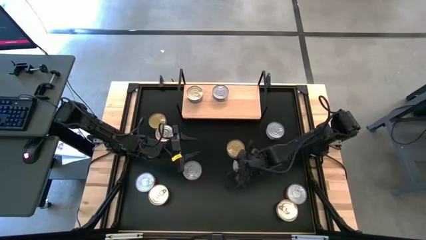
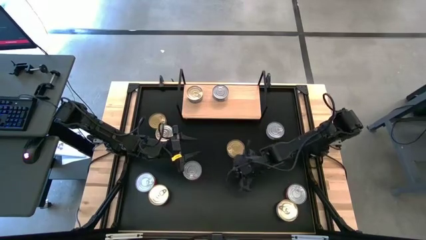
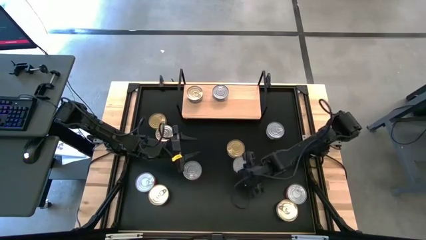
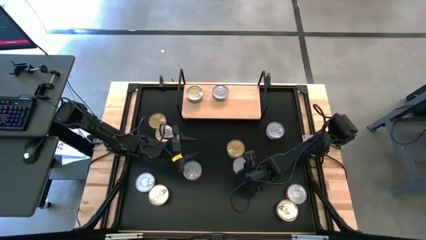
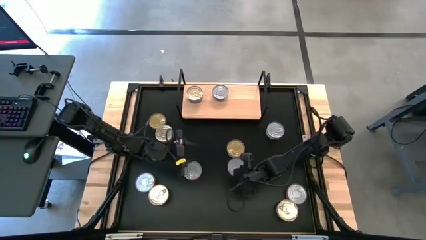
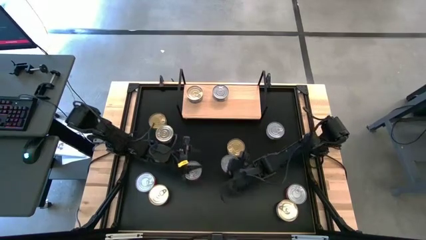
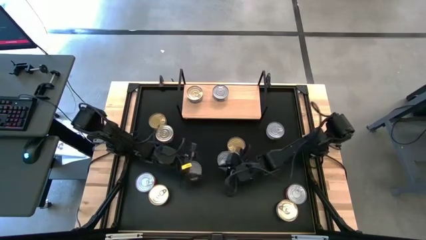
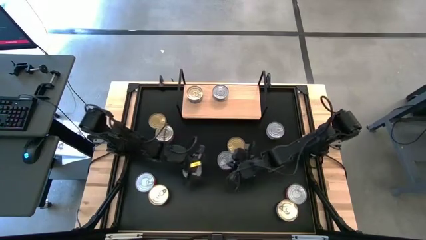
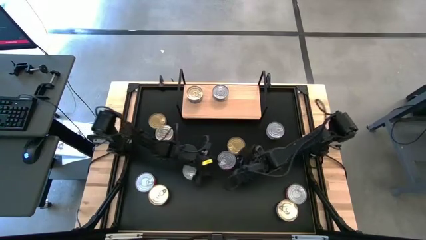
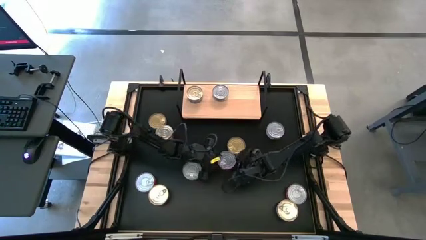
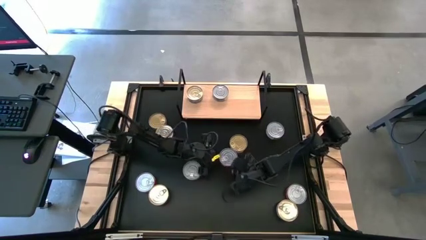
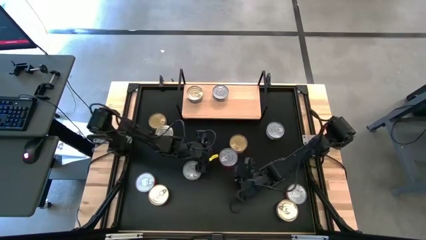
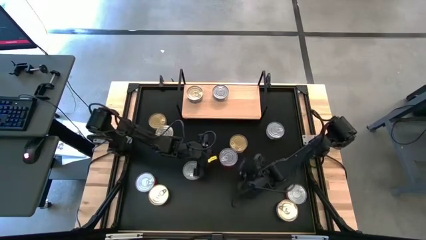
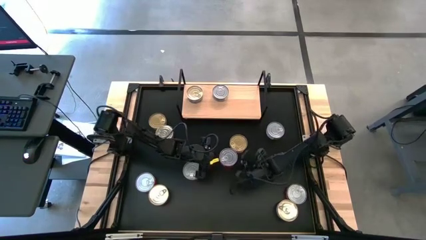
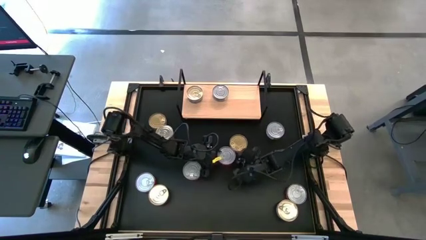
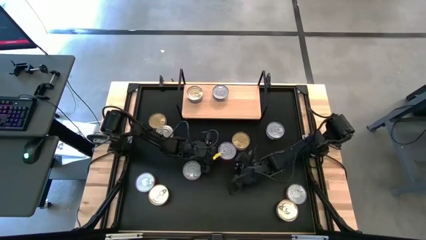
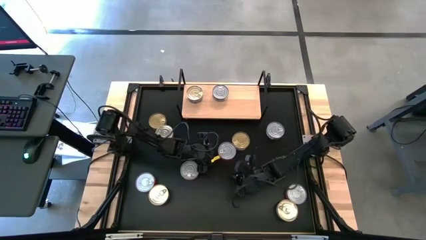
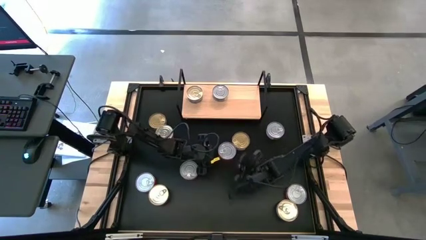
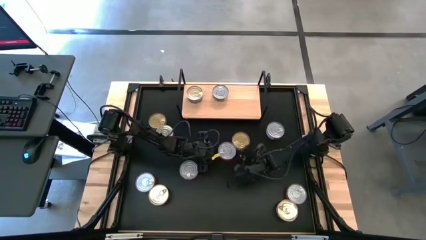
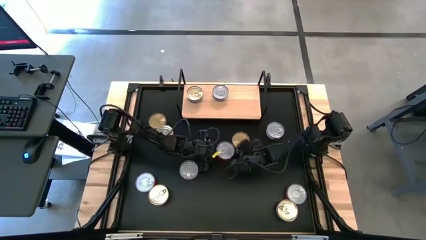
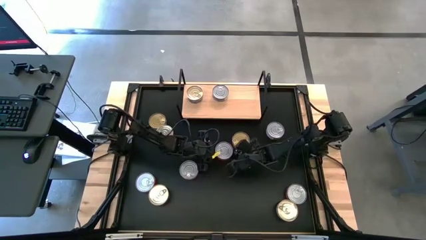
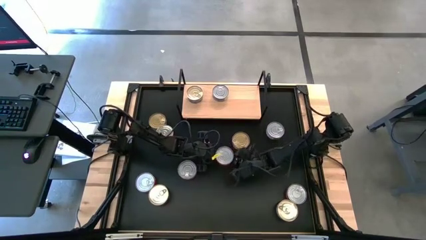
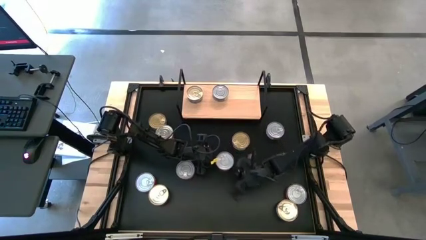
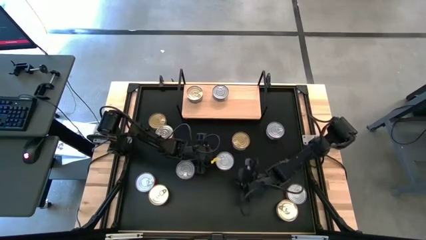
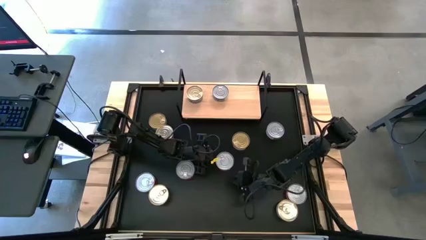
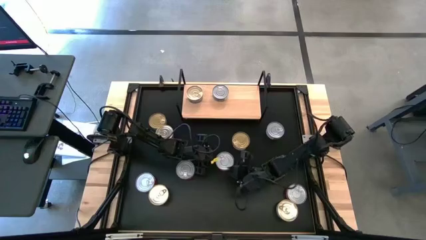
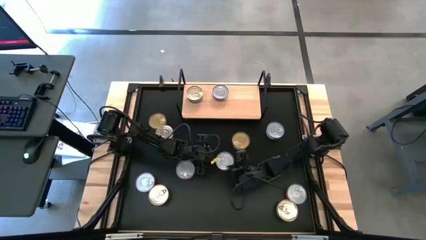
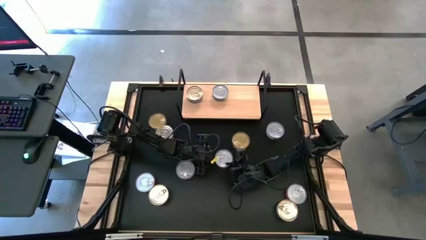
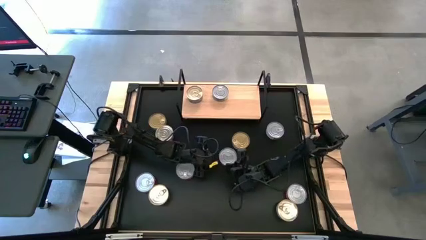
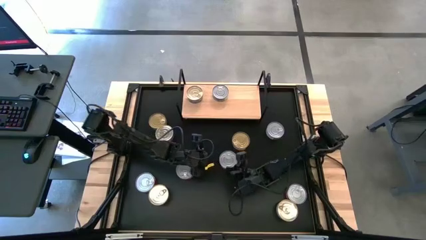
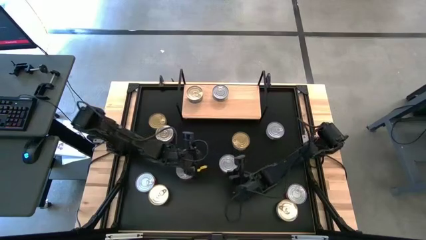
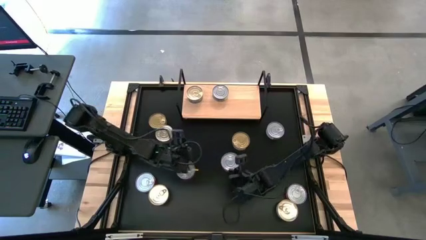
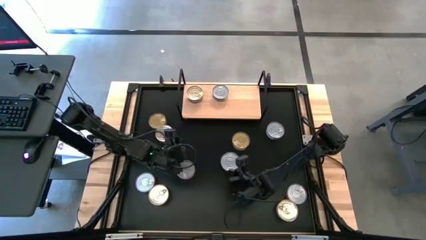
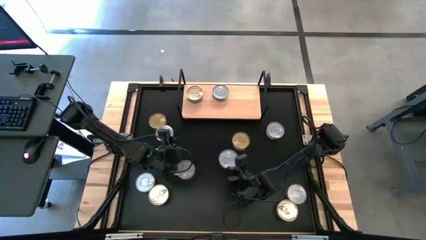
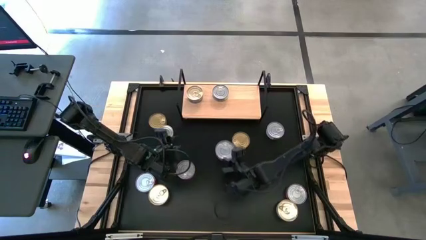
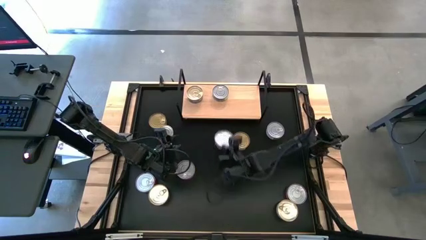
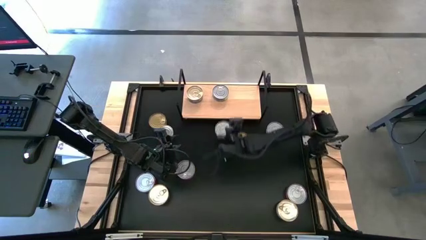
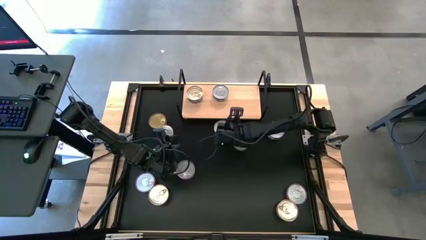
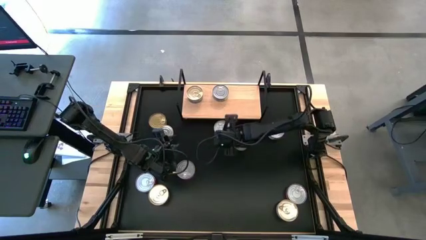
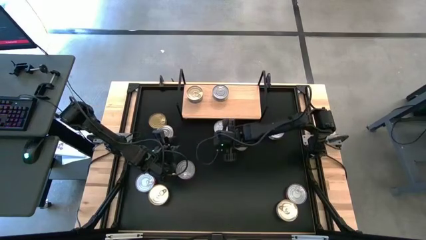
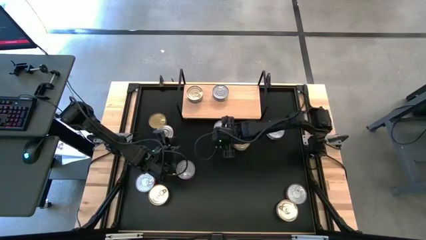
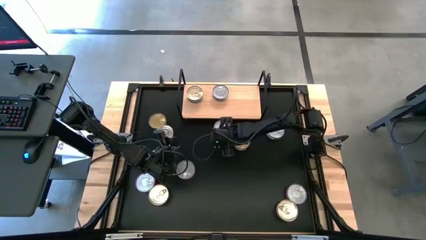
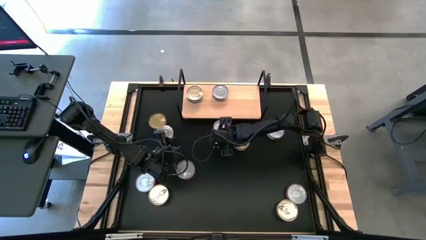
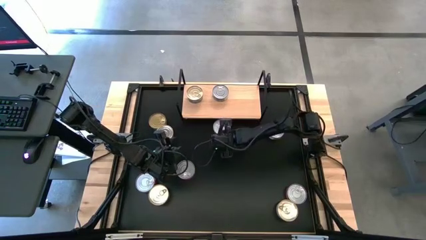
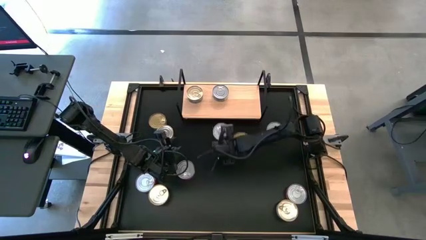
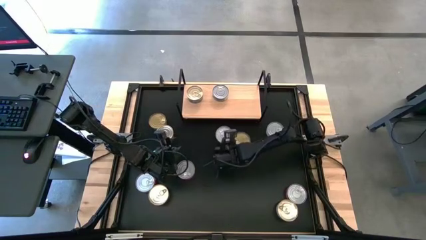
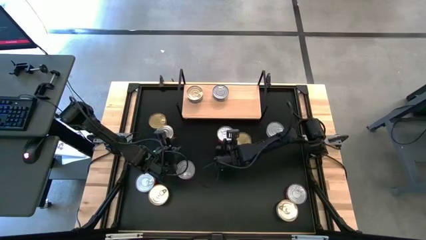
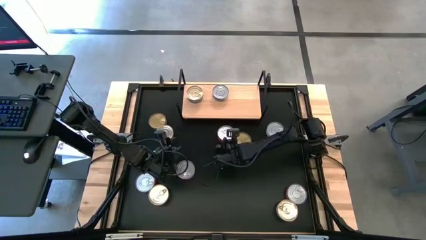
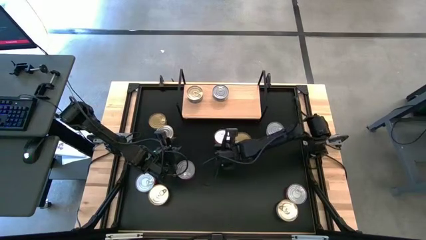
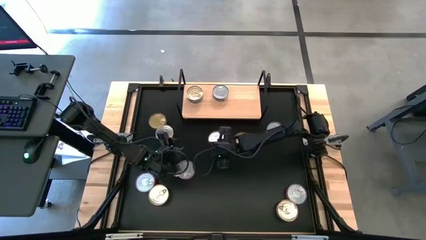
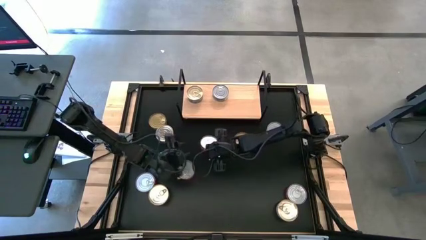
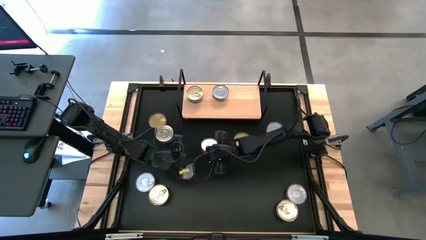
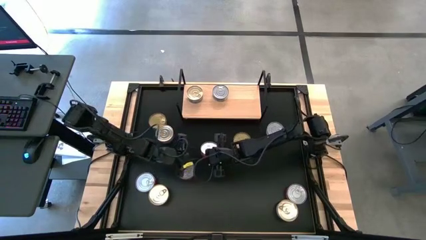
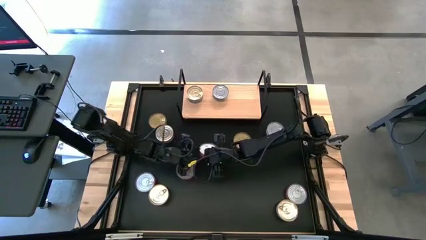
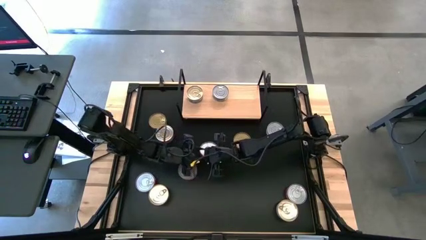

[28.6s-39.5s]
Task: Stack canned seafood by type on shelf
Put the top right red canned tuna on the shelf

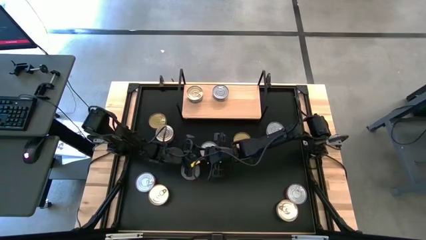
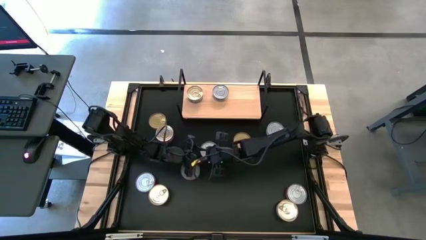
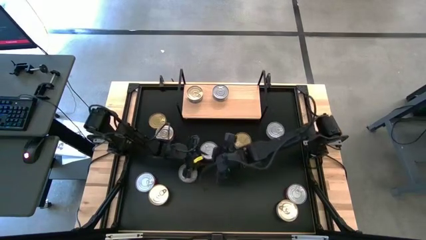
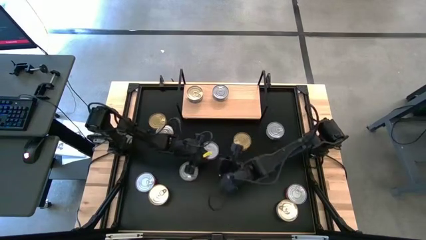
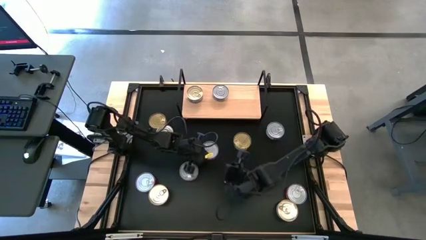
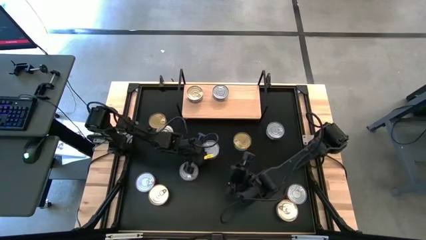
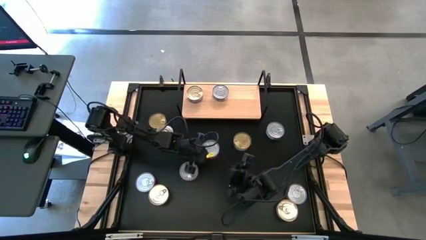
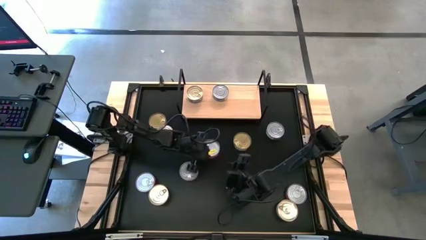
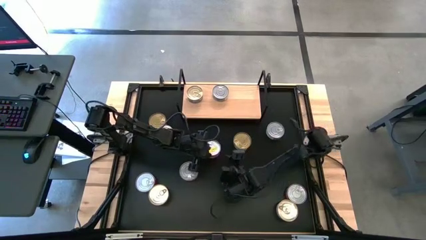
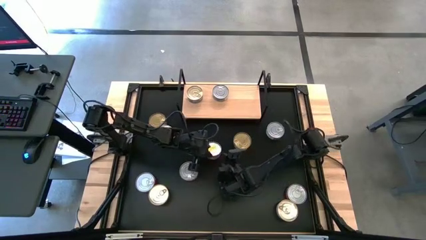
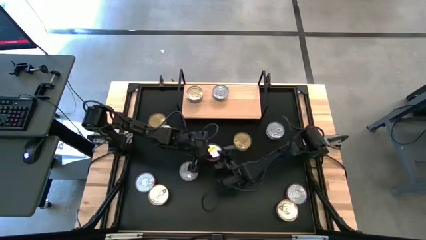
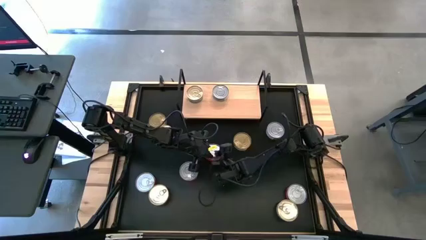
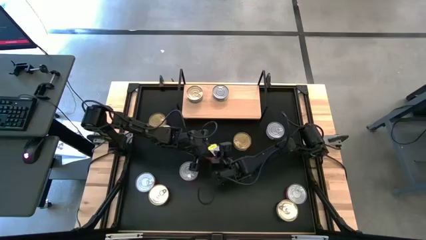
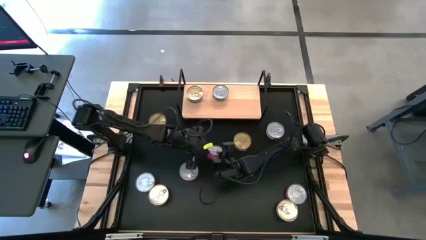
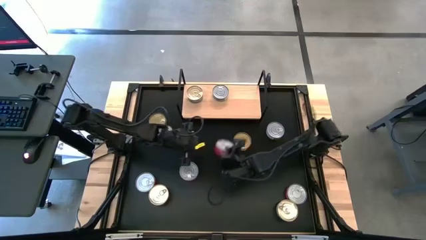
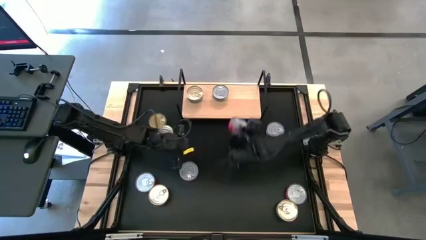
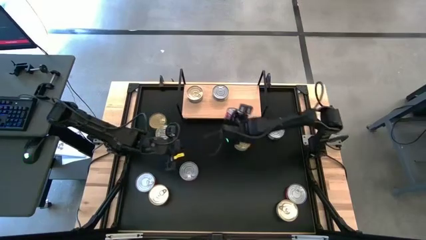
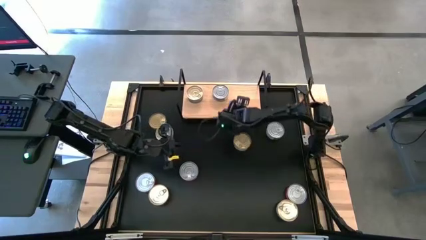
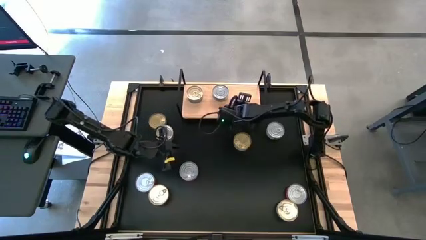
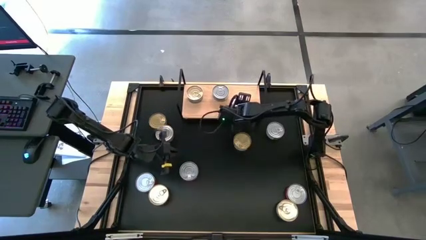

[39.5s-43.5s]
Put the top right red canned tuna on the shelf
